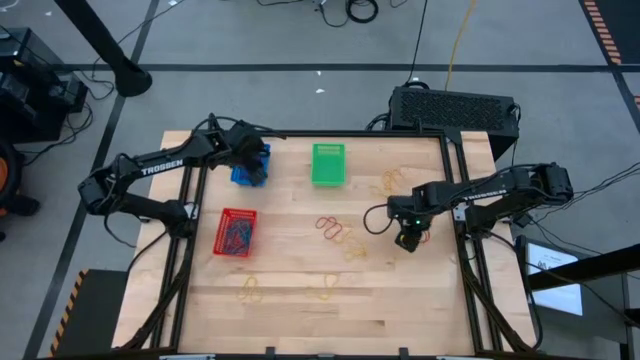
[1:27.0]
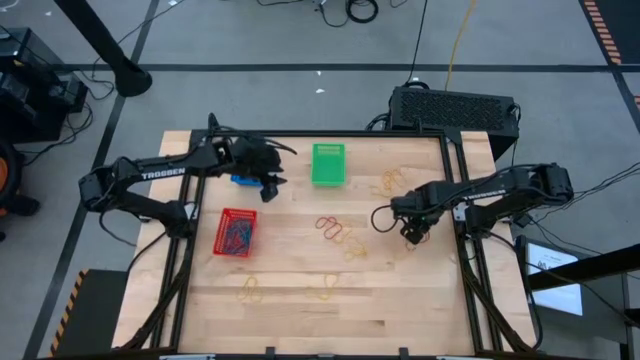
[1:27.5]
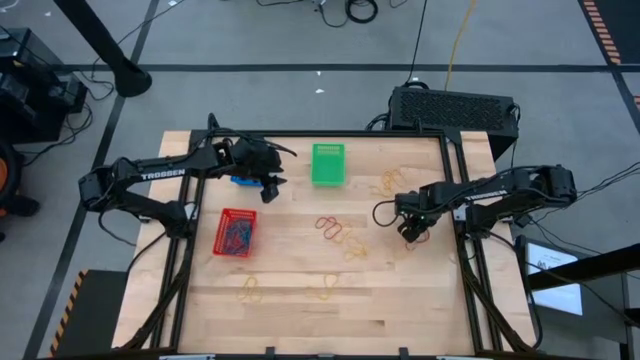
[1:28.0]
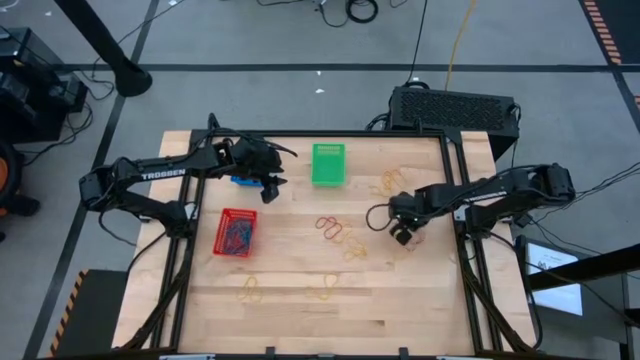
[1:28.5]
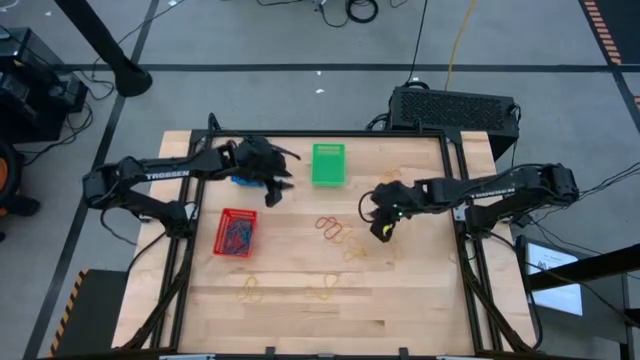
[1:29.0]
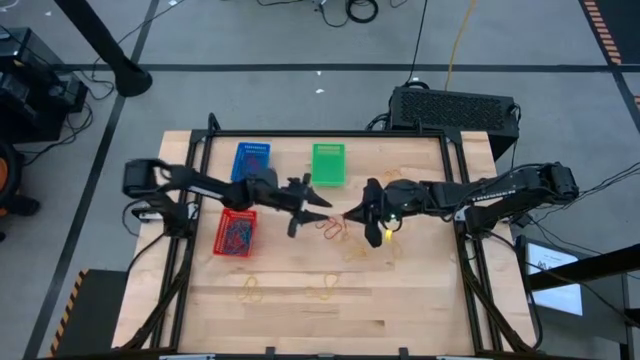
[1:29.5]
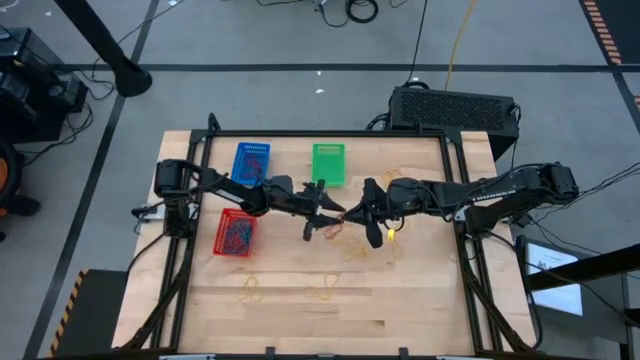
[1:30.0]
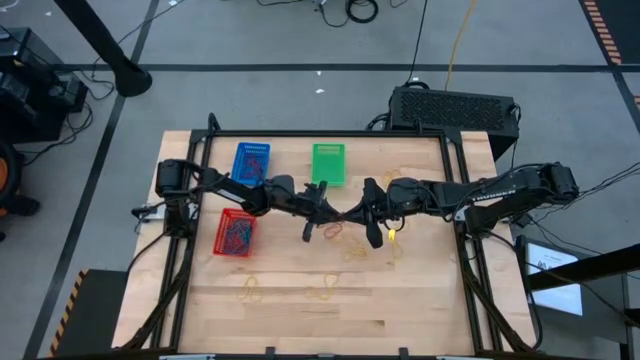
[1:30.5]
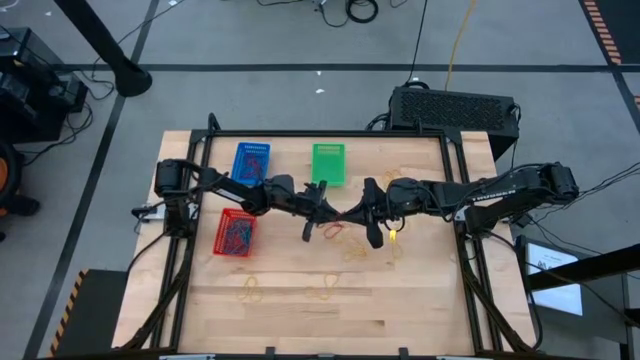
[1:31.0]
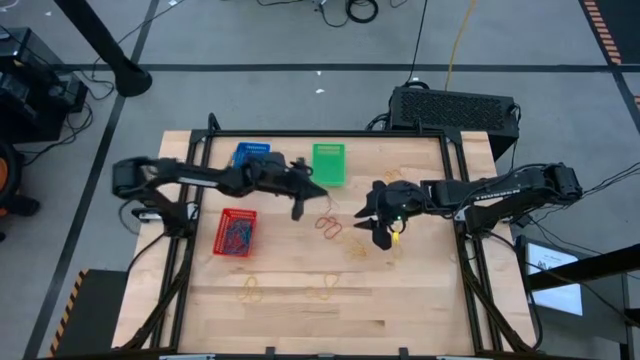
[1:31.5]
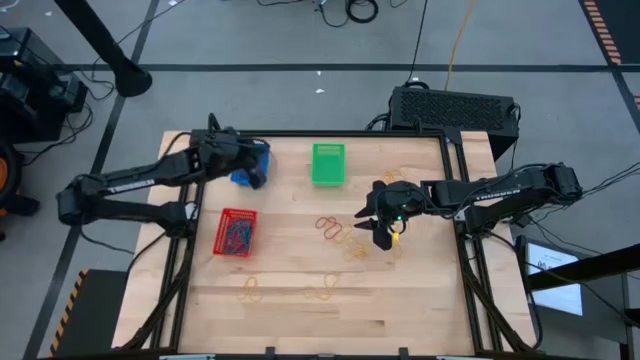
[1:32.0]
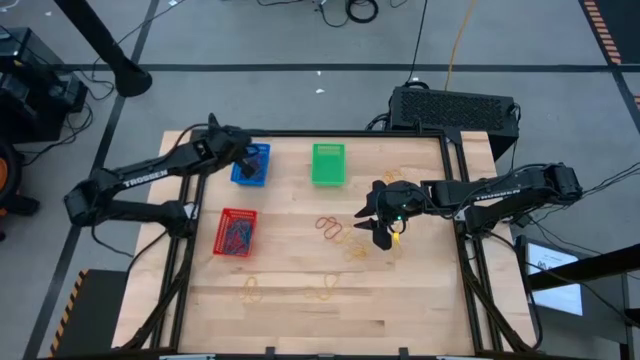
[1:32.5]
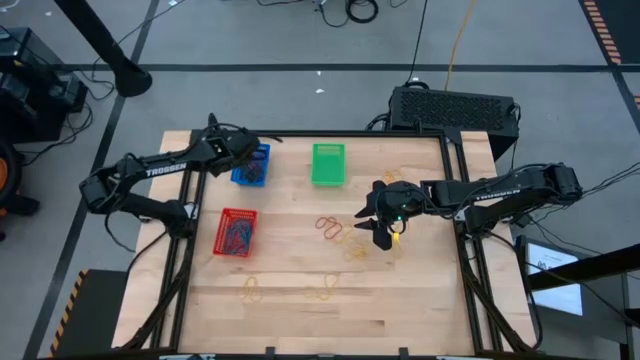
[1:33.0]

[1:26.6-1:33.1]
Task: Sort rubber bands into baskets
Put the red rubber band into the blue basket

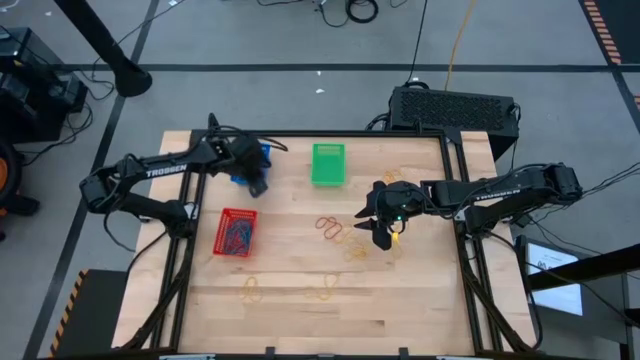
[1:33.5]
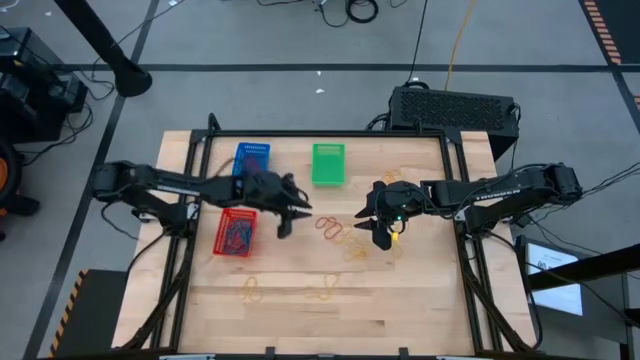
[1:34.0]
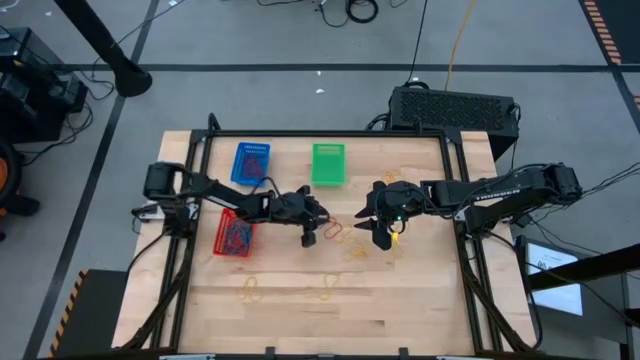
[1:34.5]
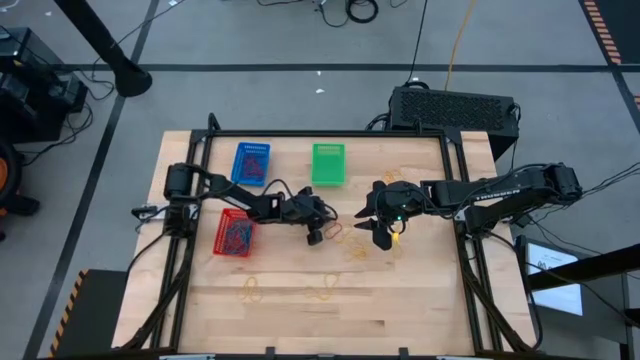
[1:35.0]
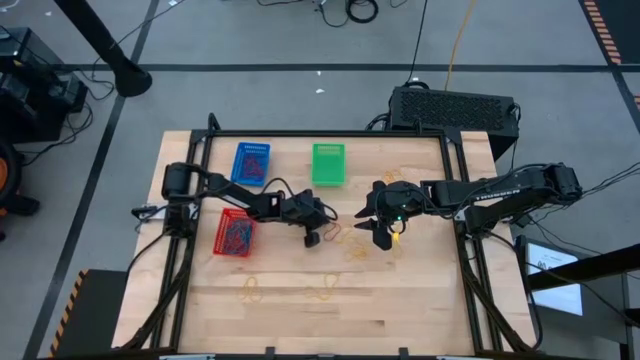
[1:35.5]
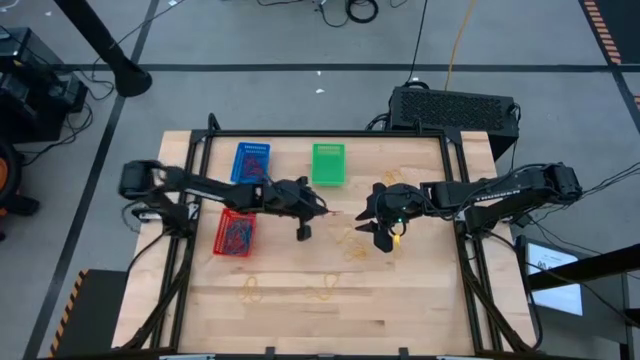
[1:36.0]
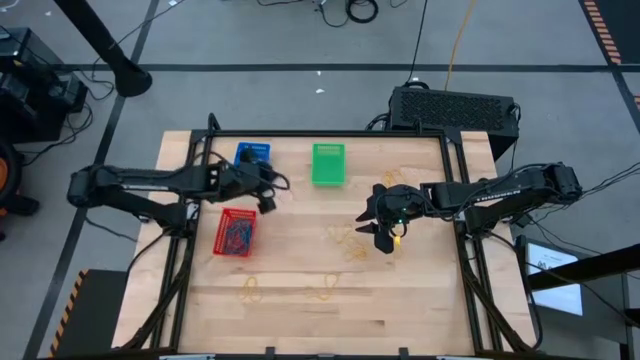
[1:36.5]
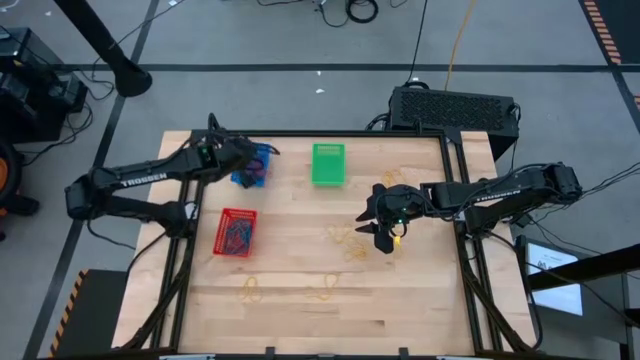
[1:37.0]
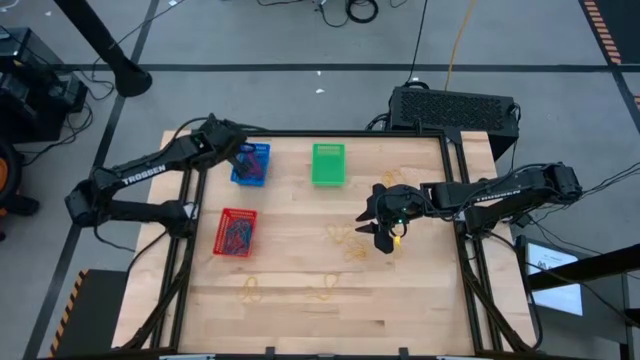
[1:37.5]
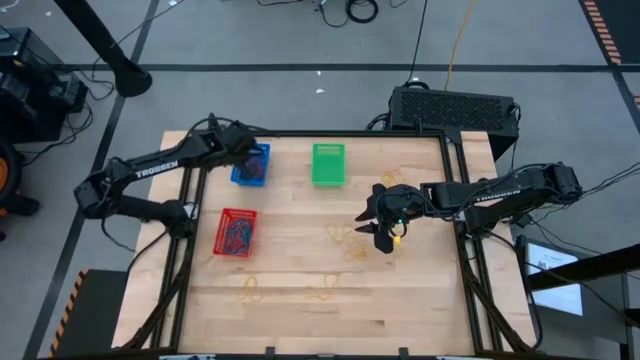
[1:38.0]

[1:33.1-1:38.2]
Put the red rubber band into the blue basket

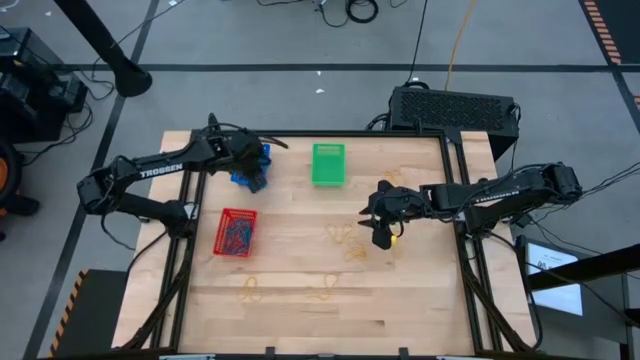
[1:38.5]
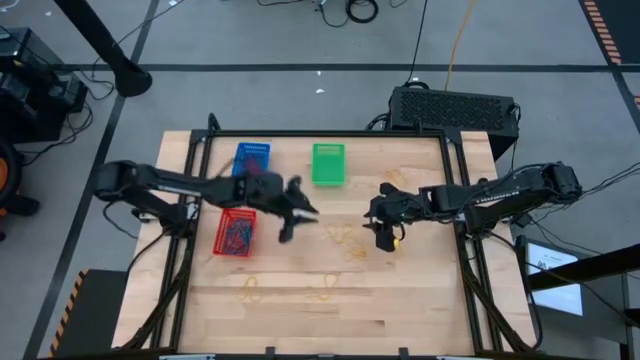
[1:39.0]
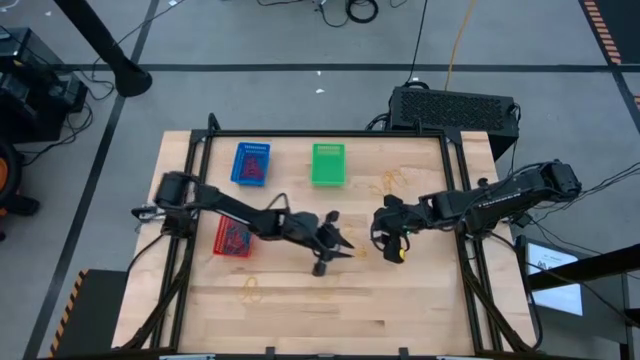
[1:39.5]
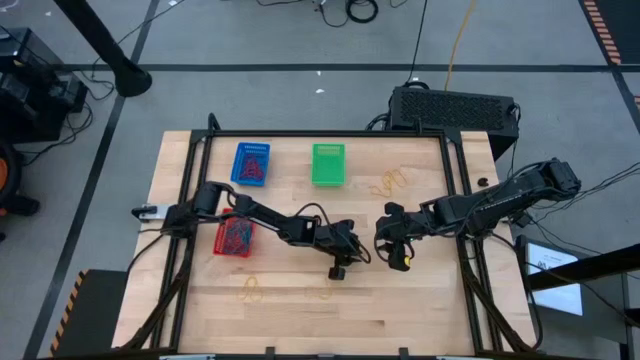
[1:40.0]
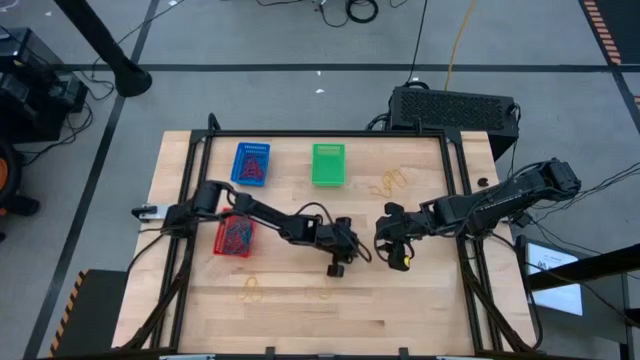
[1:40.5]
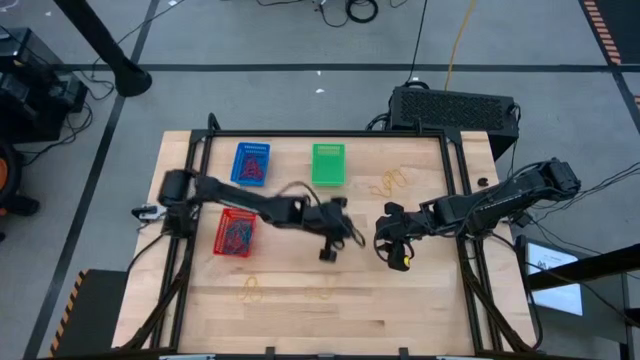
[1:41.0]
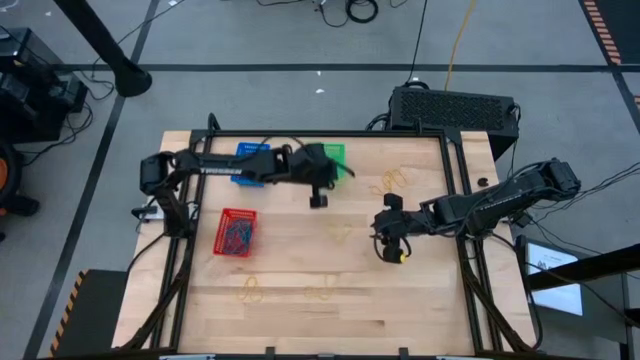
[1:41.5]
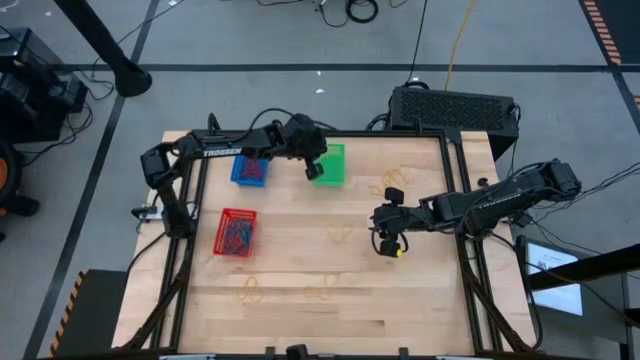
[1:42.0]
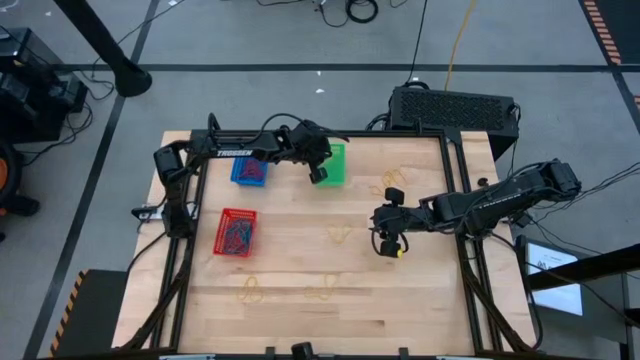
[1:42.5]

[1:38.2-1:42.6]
Put the yellow rubber band into the green basket

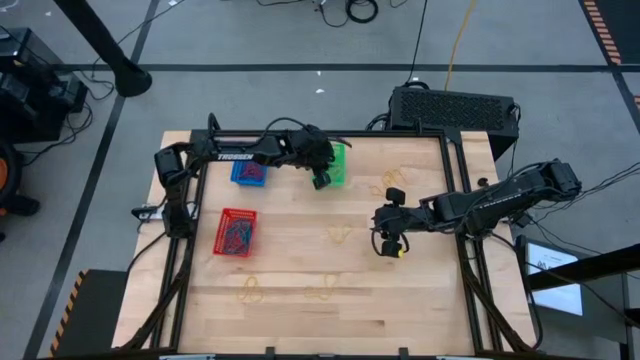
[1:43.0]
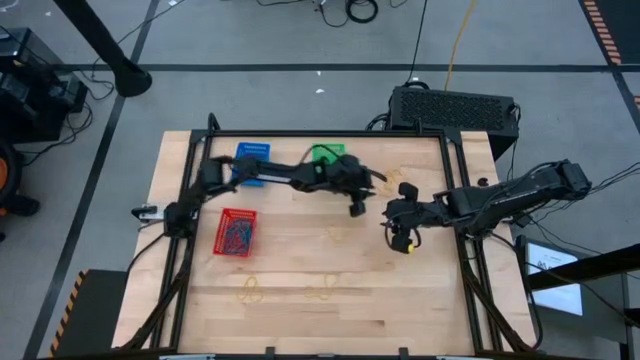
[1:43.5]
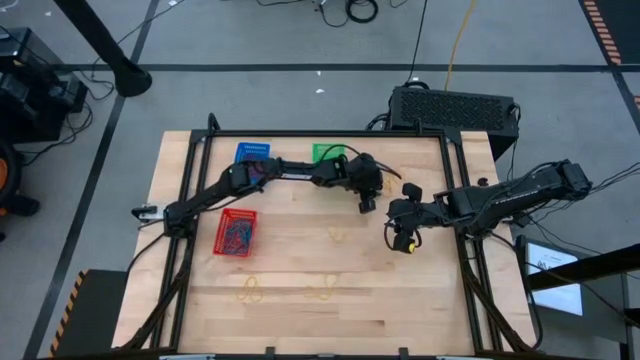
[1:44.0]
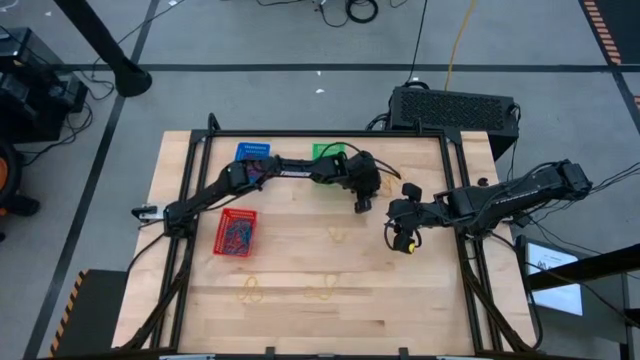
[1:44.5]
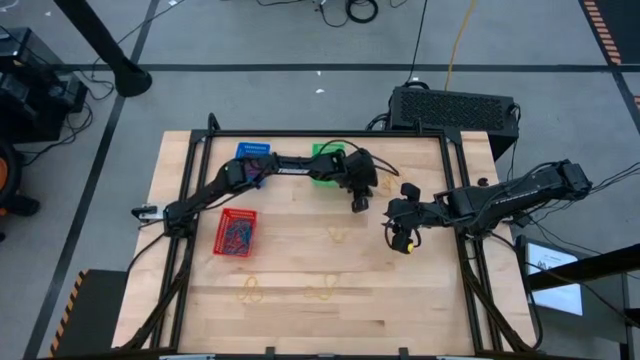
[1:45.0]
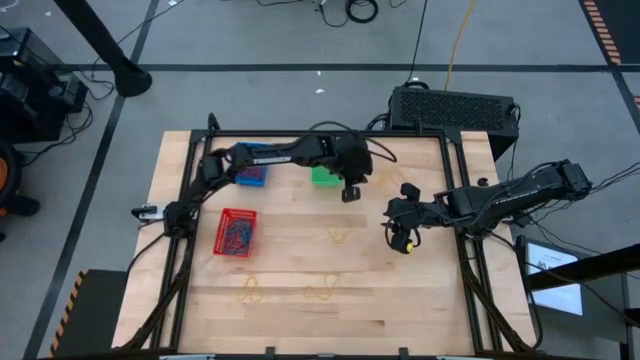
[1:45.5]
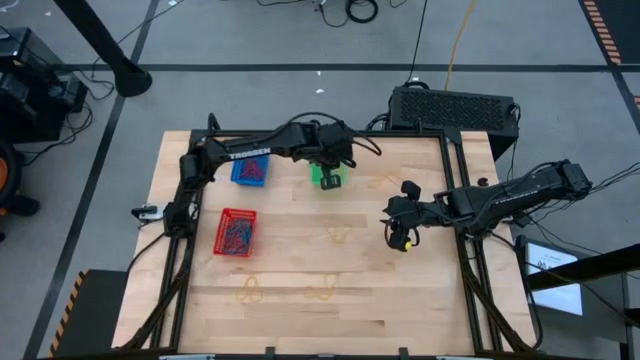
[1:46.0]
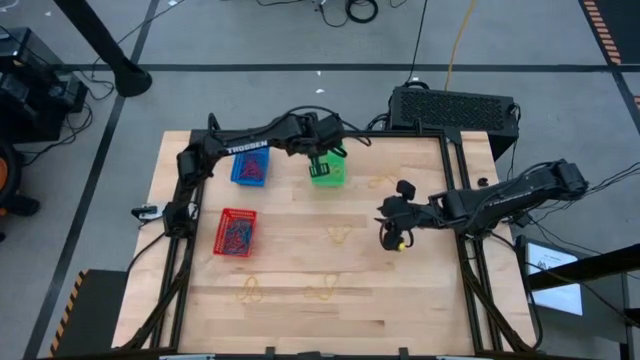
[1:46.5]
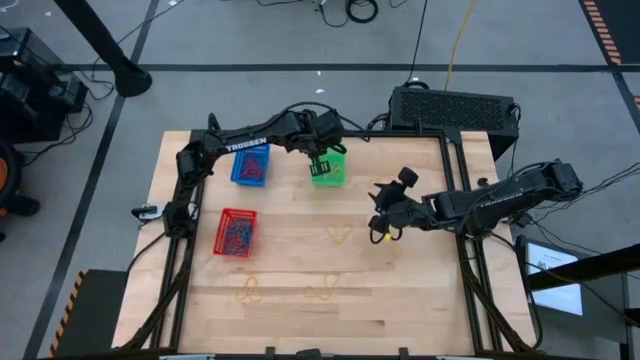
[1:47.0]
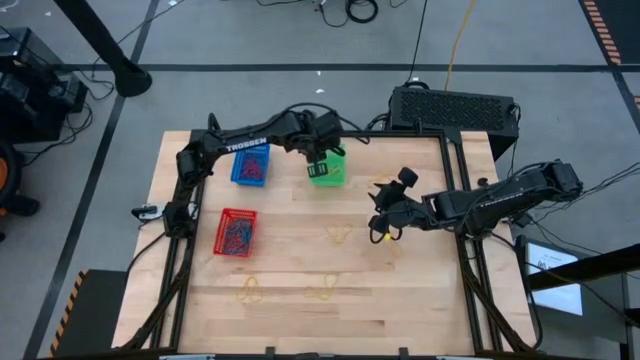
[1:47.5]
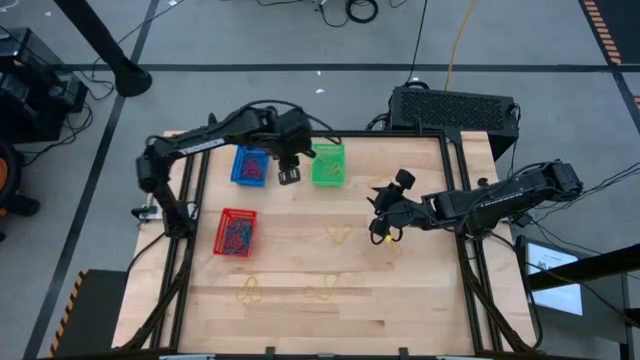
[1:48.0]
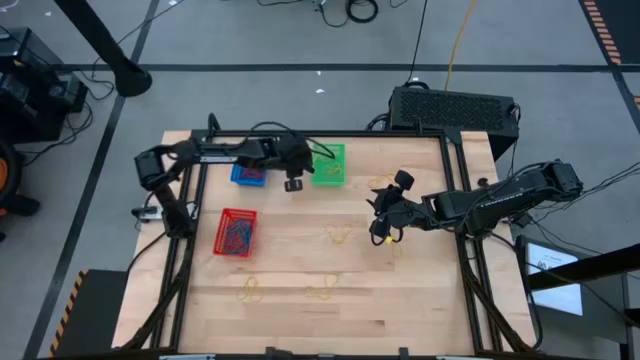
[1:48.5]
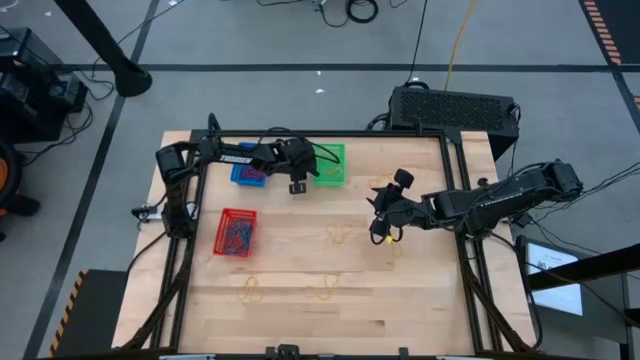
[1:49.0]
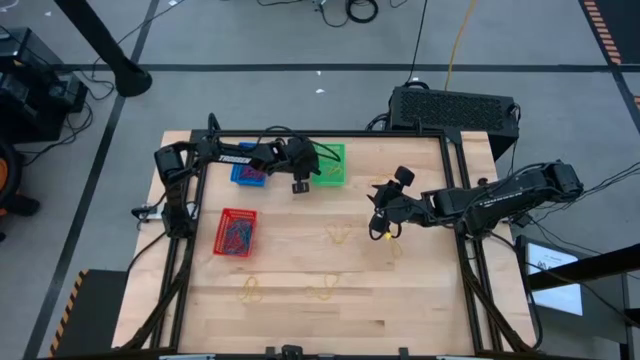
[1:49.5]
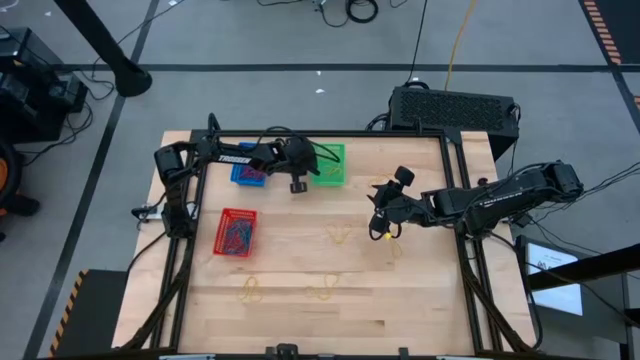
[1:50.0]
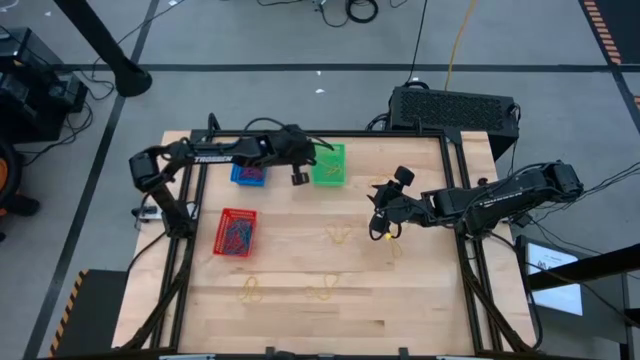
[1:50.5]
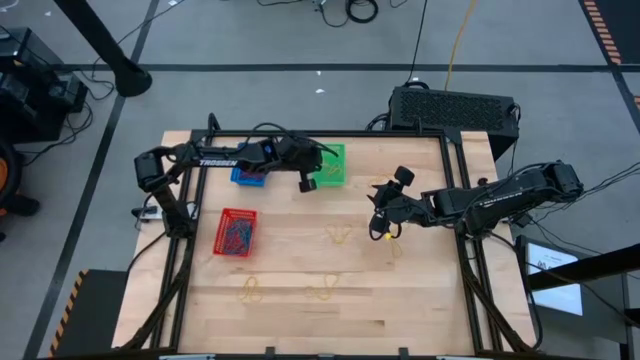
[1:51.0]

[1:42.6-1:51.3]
Put the yellow rubber band into the green basket
